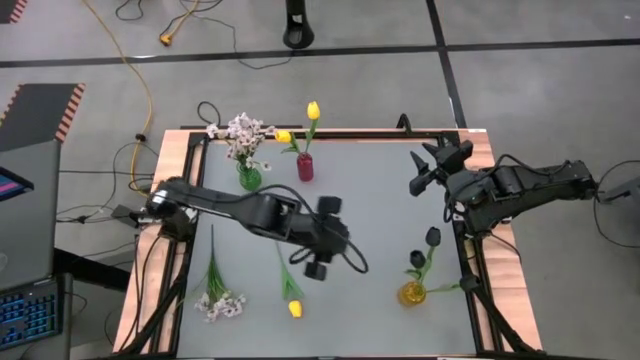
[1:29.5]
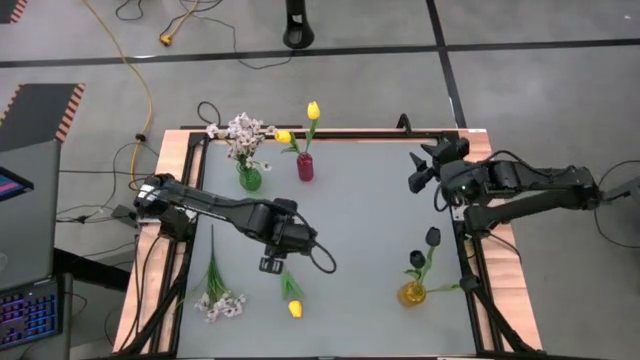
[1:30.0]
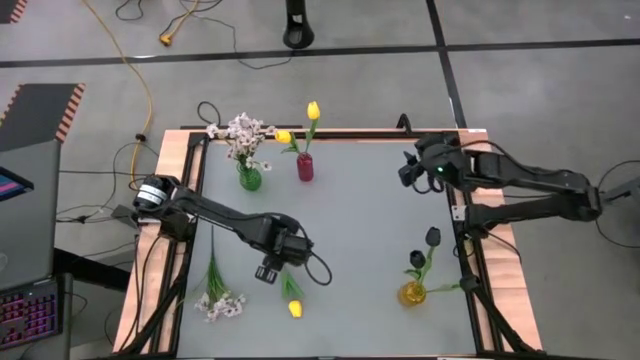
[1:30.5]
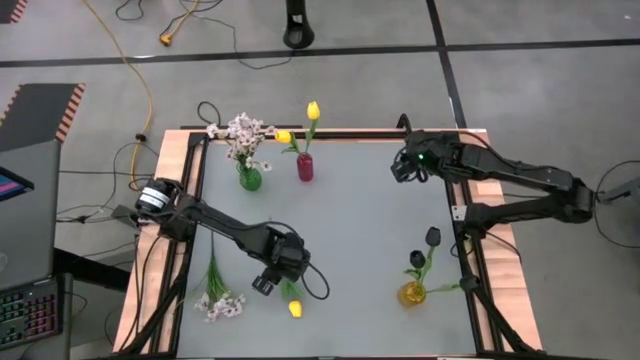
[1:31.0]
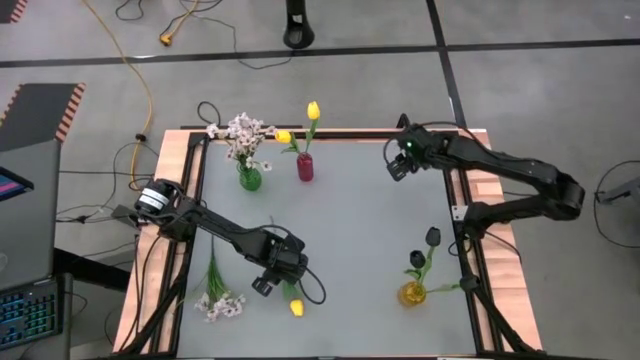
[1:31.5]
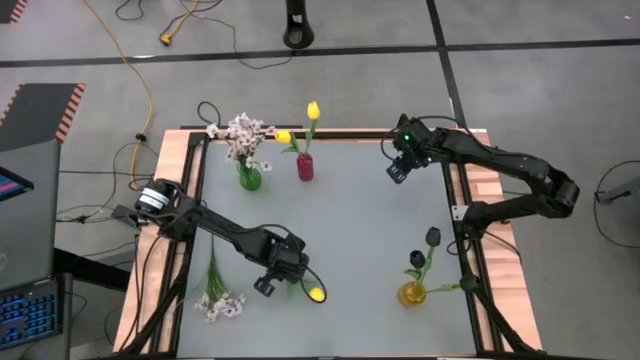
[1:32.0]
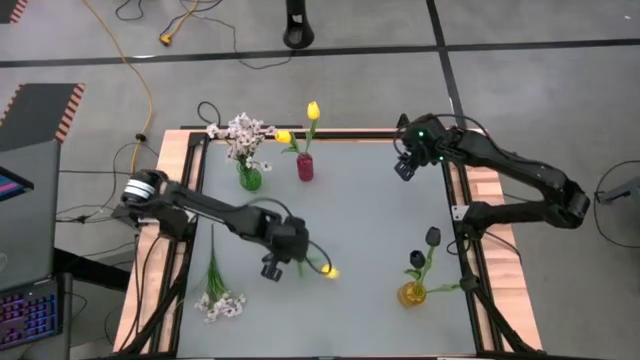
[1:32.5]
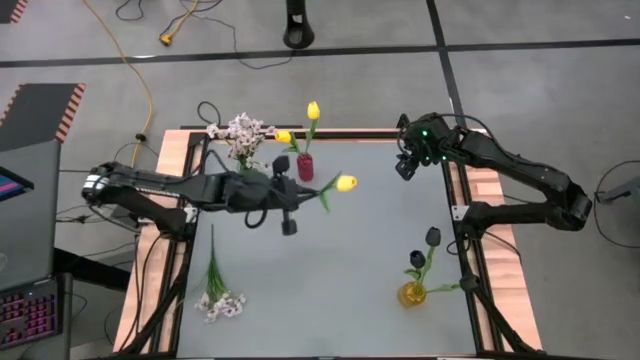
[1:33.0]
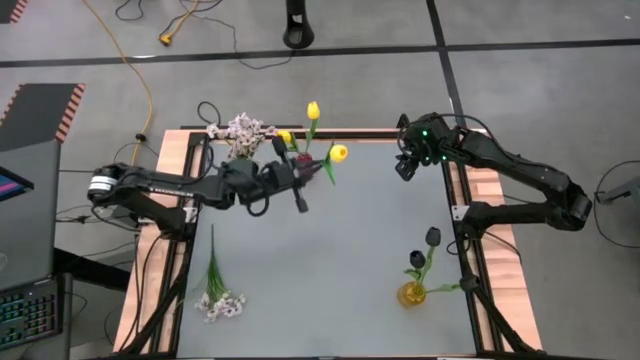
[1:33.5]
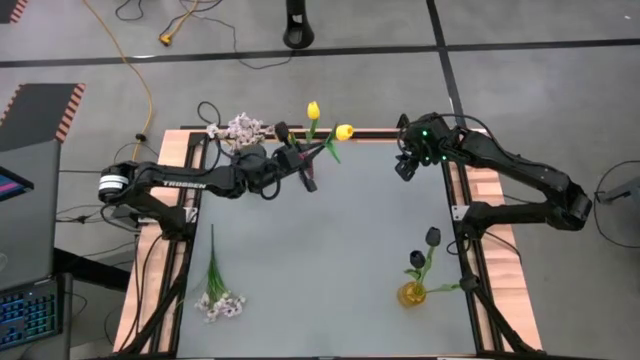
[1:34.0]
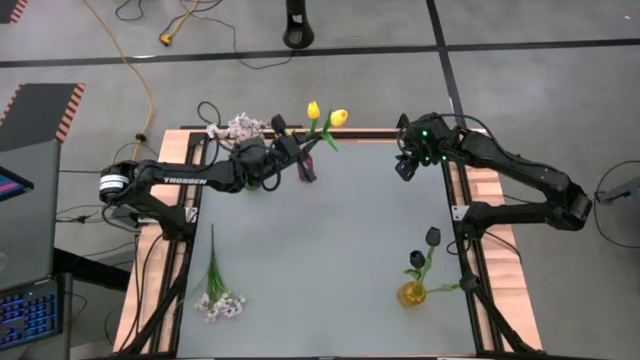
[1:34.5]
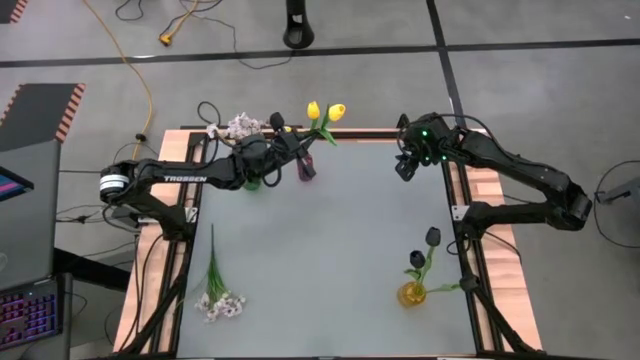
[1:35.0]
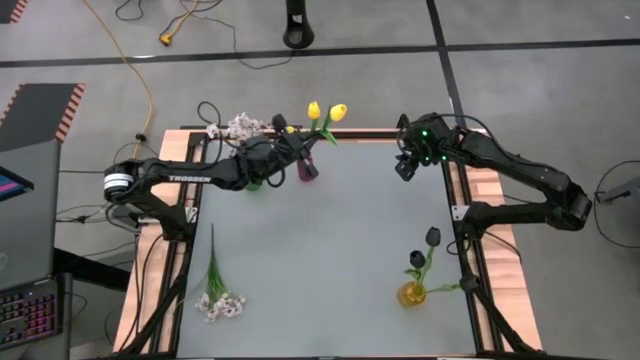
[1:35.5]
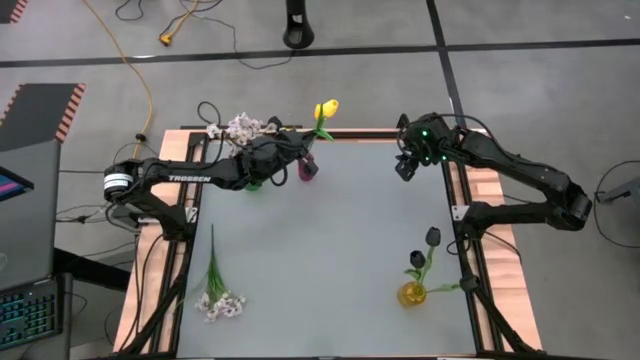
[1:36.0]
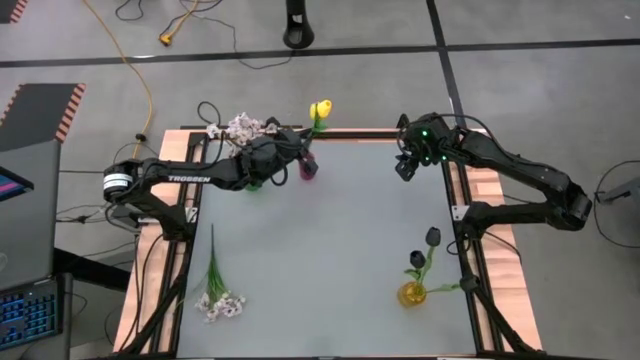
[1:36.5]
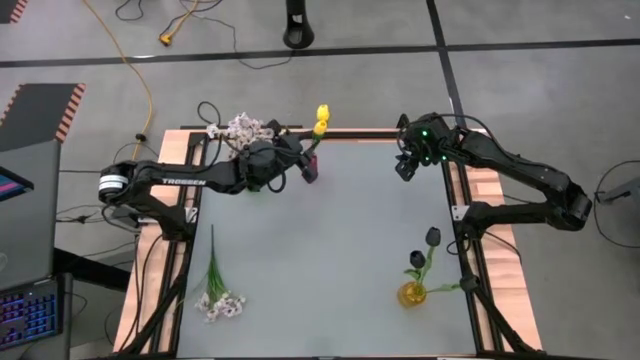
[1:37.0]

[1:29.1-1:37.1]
Task: Sort flowers into vase by color
Put the yellow tulip into the red vase

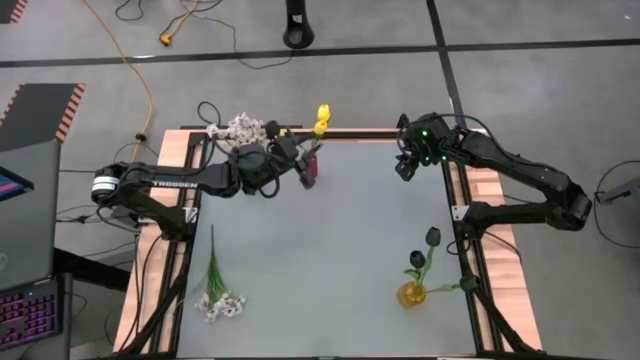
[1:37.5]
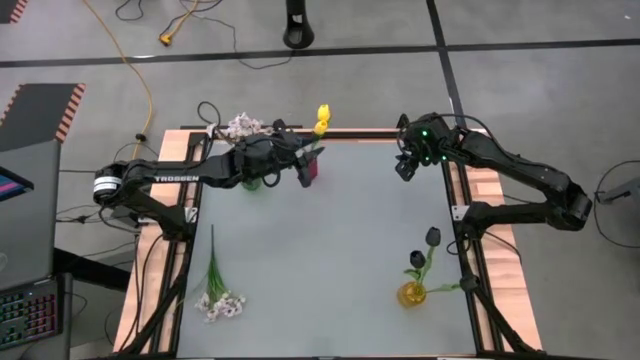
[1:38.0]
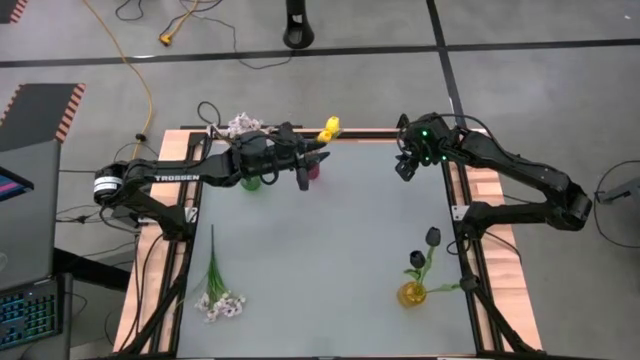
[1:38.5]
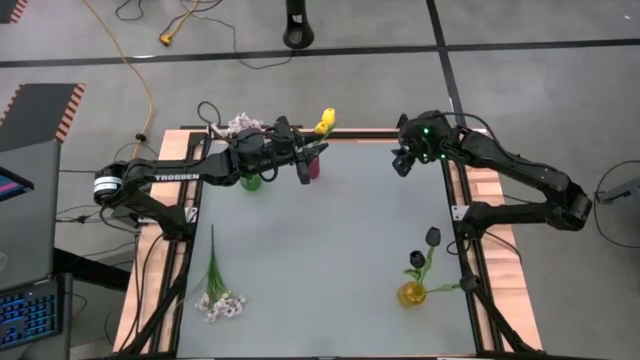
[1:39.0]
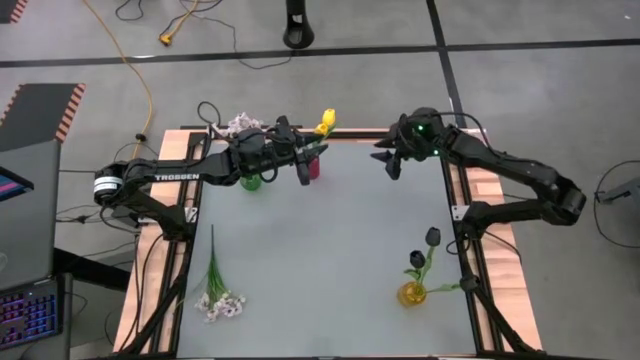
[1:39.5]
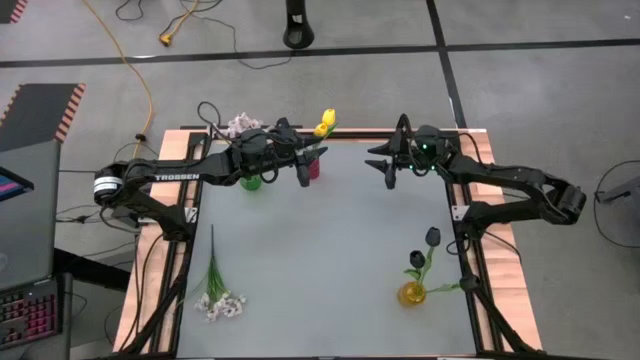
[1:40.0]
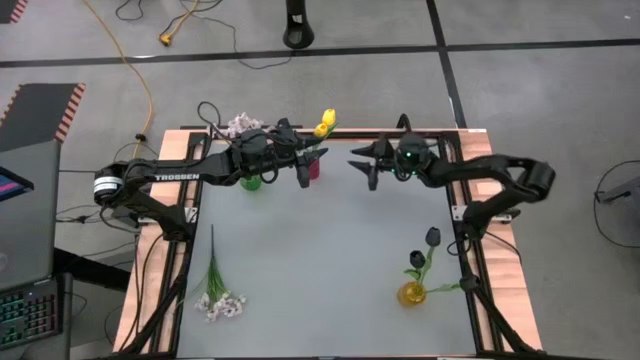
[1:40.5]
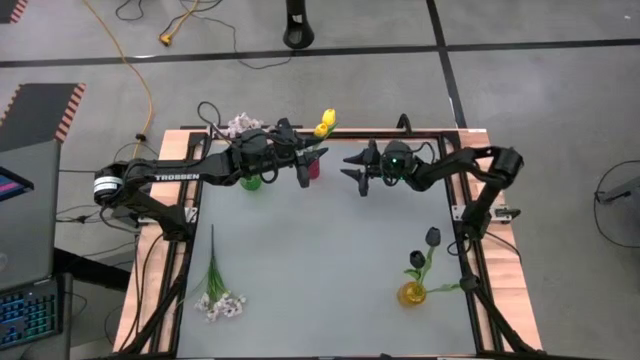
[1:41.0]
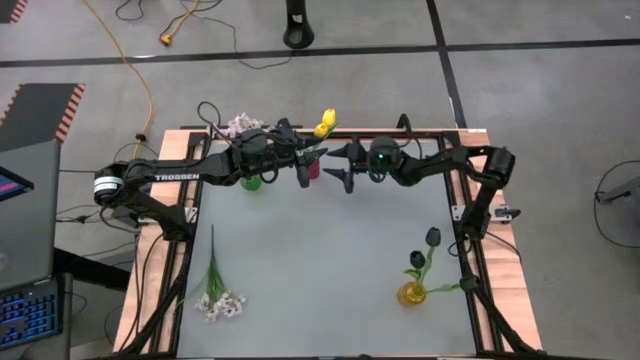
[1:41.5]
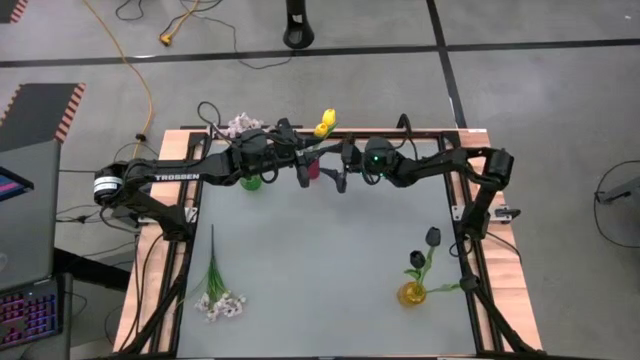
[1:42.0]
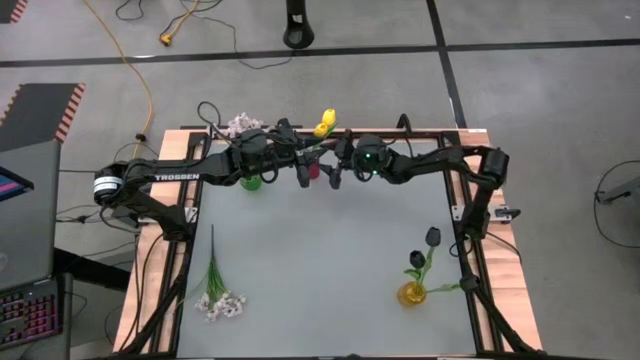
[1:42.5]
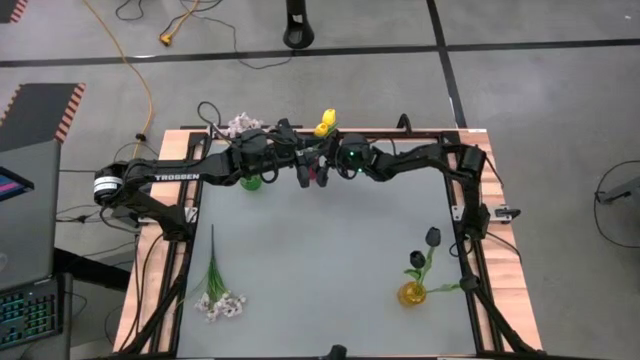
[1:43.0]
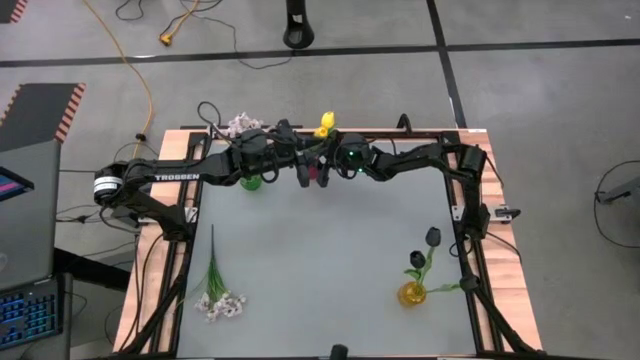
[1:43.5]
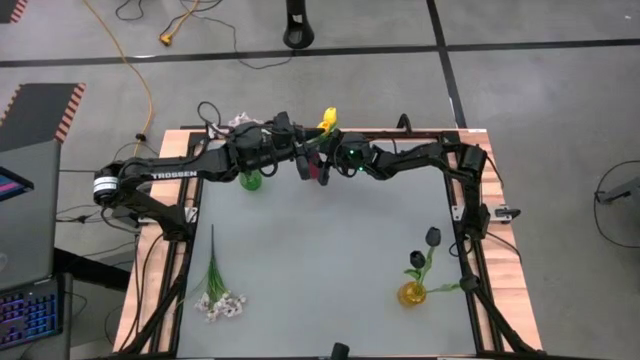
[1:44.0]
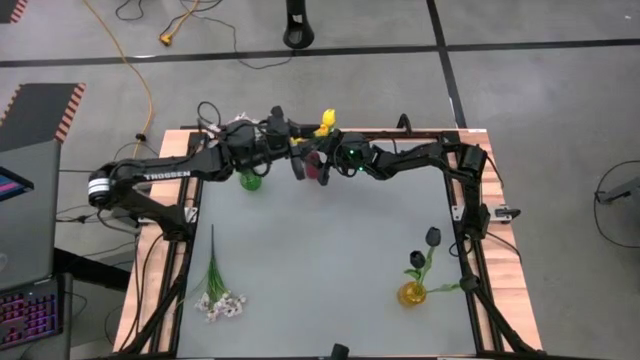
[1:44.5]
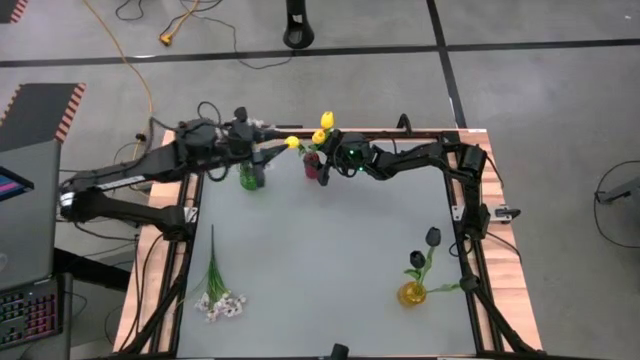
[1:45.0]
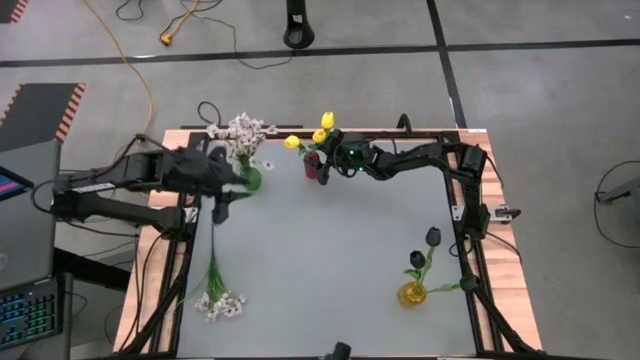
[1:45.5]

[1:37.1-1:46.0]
Adjust the red vase
